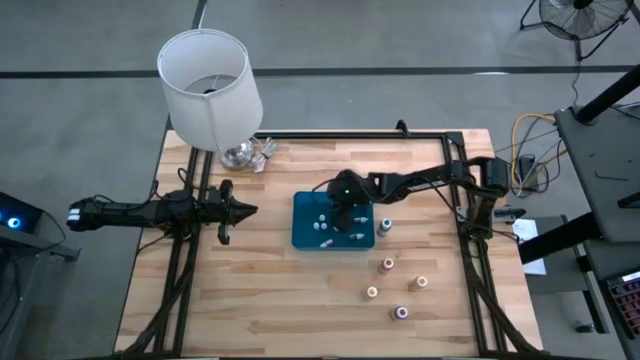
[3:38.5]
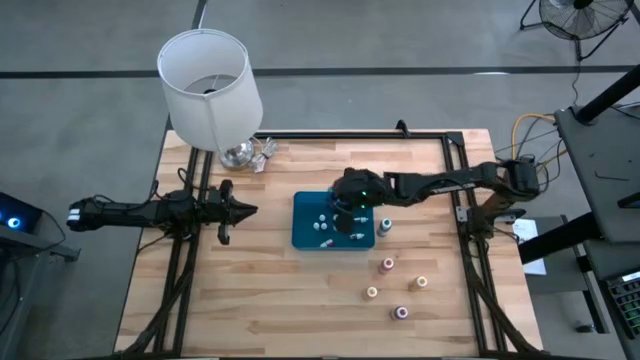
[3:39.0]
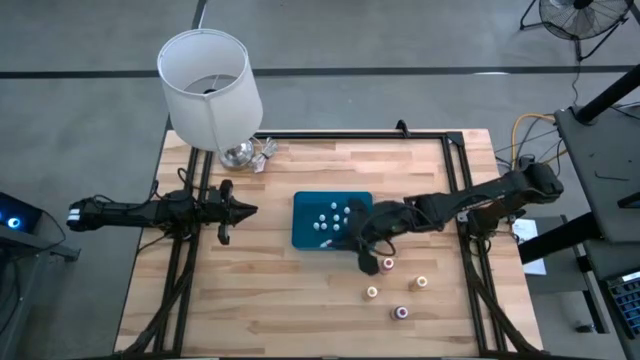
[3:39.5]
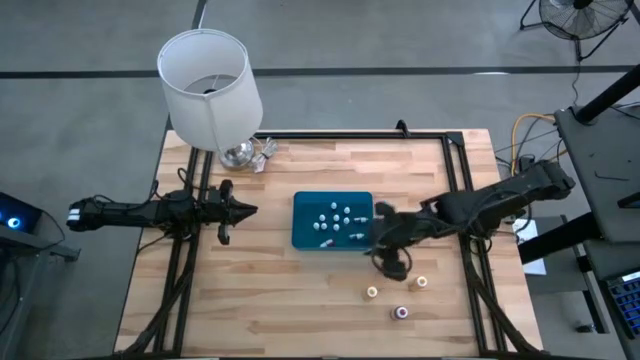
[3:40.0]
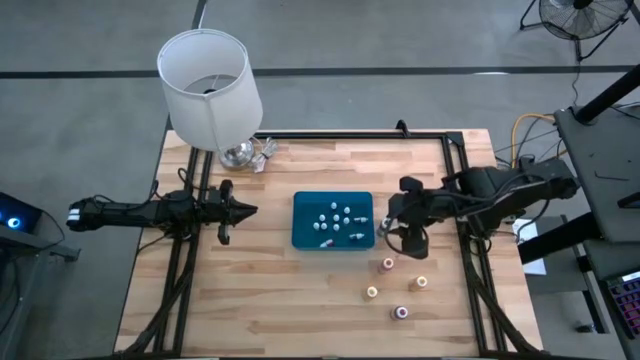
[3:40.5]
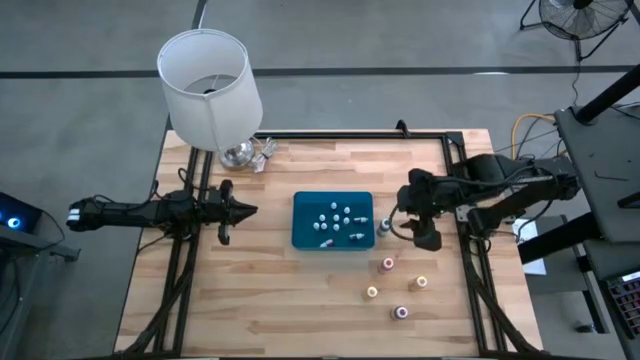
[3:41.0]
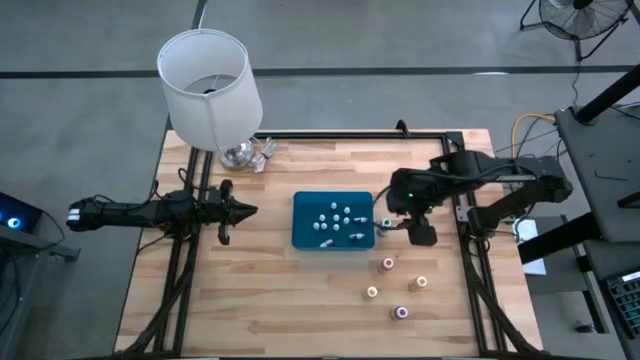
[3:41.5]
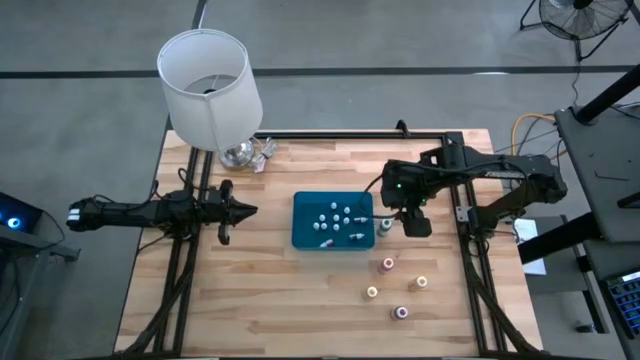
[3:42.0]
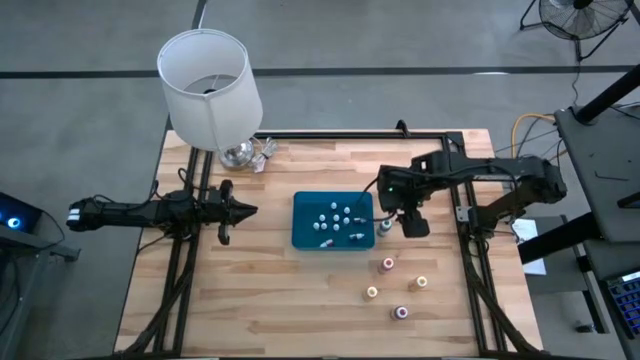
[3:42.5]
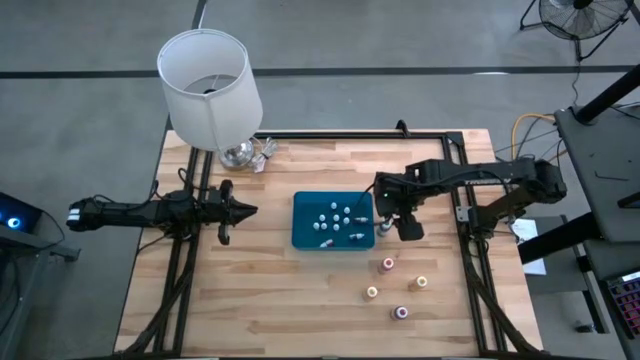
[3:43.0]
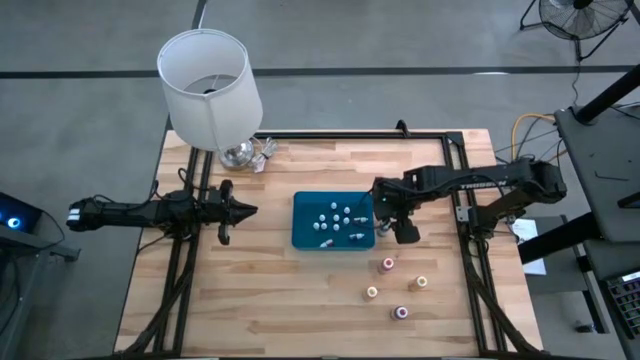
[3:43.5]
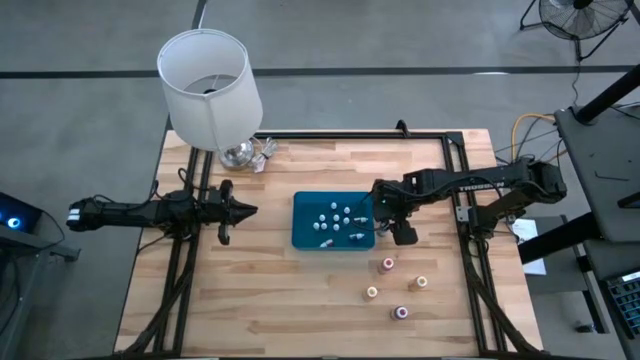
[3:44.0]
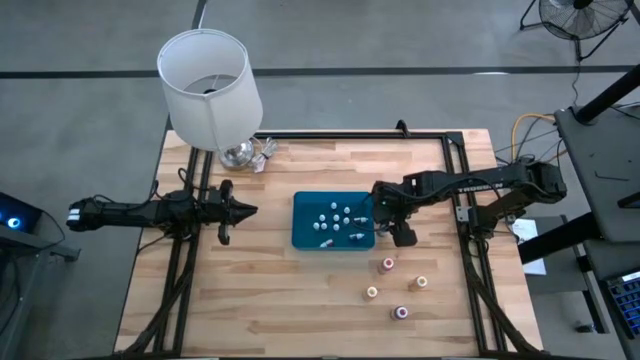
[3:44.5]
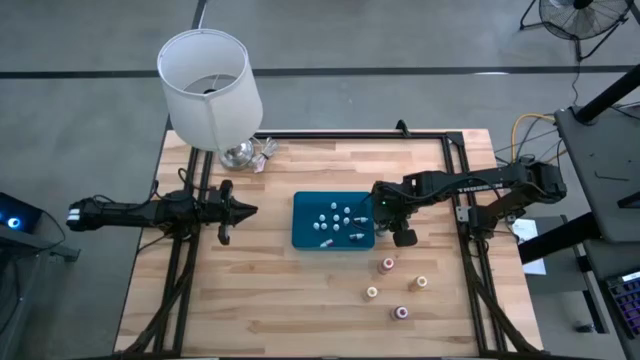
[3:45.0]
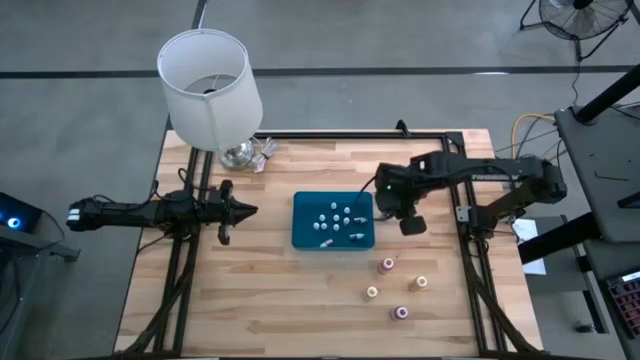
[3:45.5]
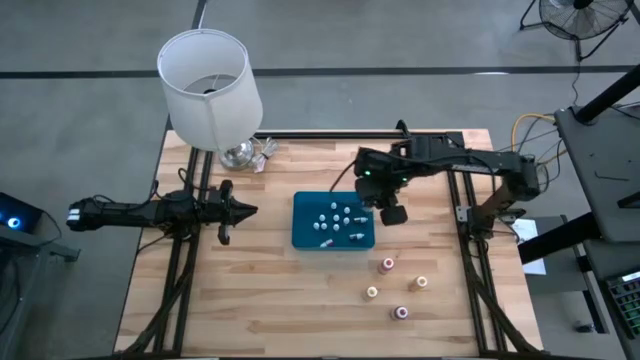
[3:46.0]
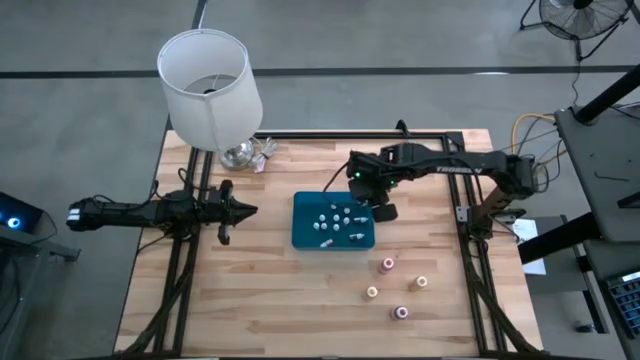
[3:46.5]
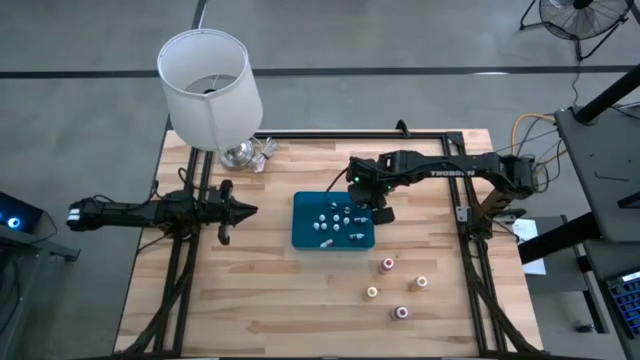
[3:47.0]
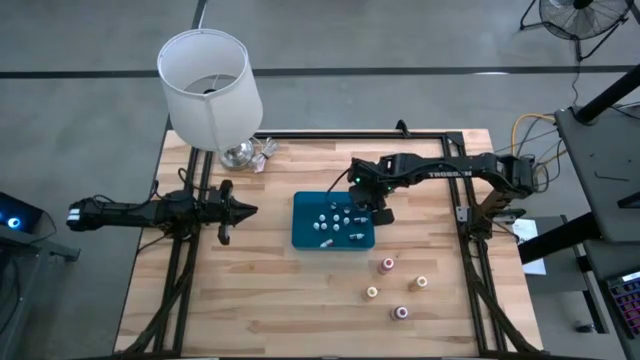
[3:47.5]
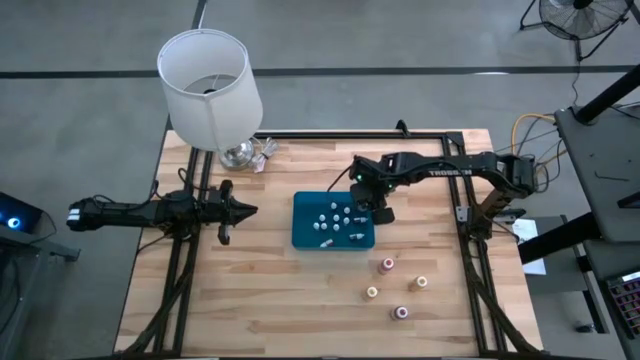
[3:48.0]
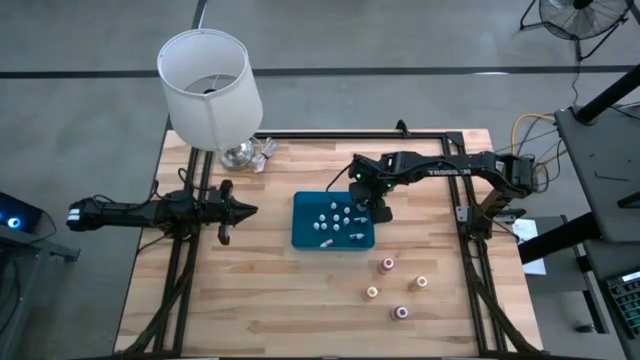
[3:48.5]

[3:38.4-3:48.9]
Task: Pick & Place food coloring
Put the large green food coloring bottle into the blue bin

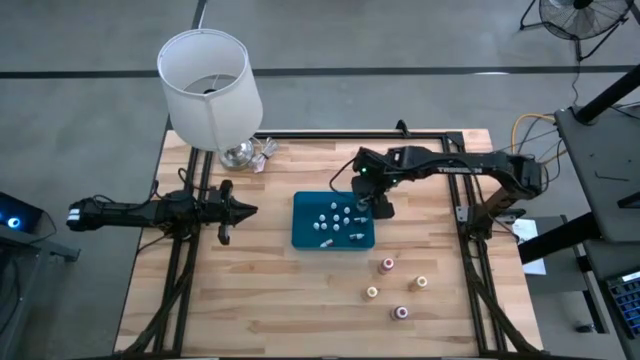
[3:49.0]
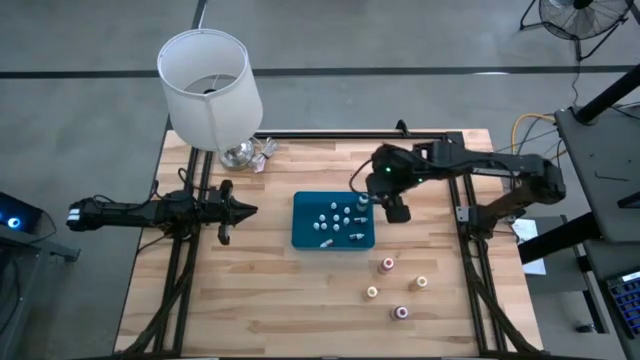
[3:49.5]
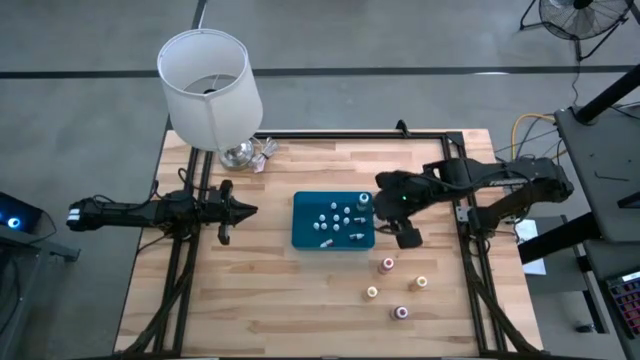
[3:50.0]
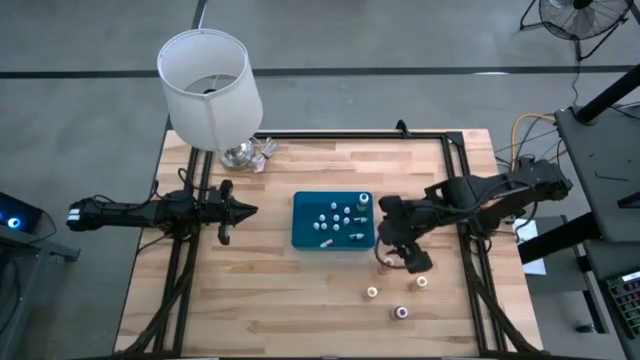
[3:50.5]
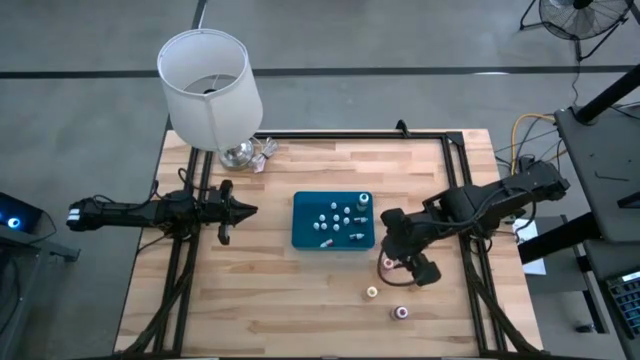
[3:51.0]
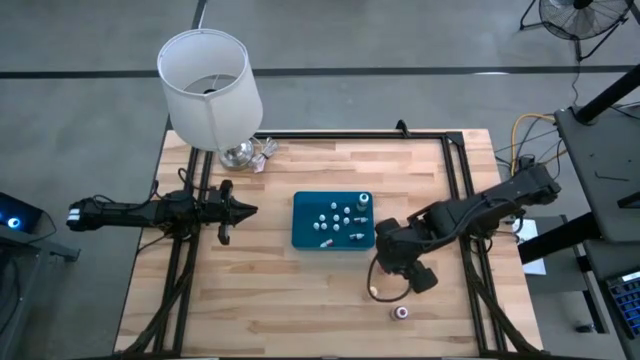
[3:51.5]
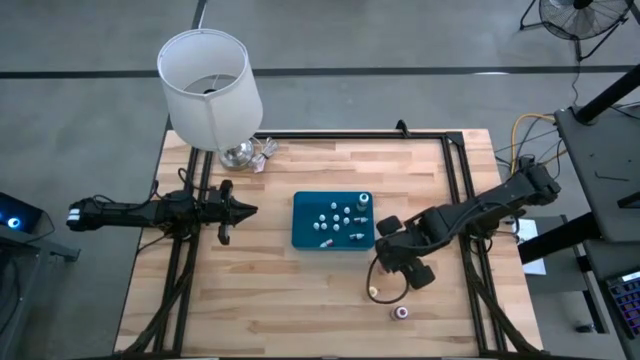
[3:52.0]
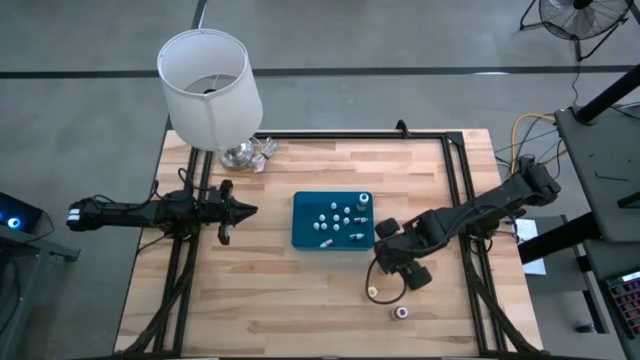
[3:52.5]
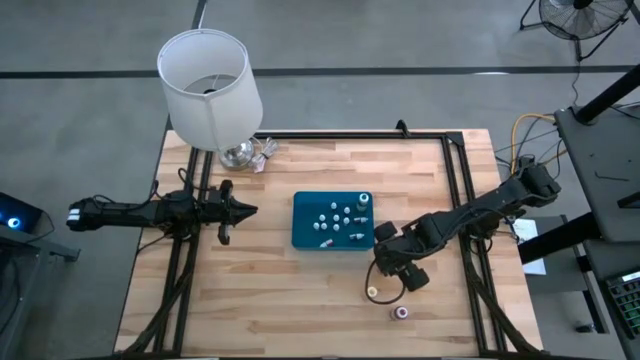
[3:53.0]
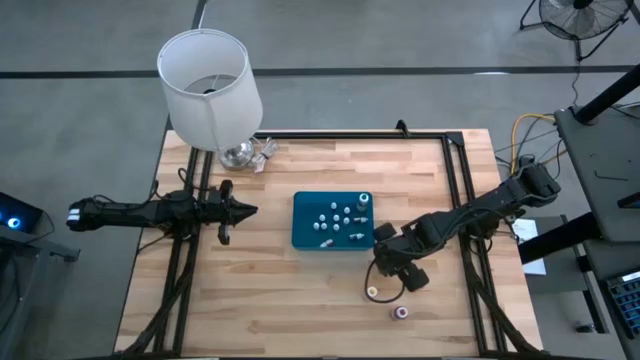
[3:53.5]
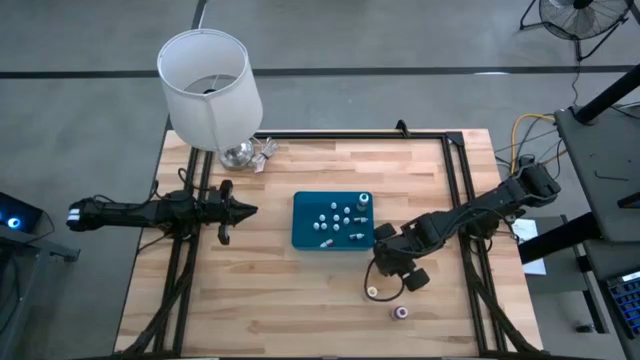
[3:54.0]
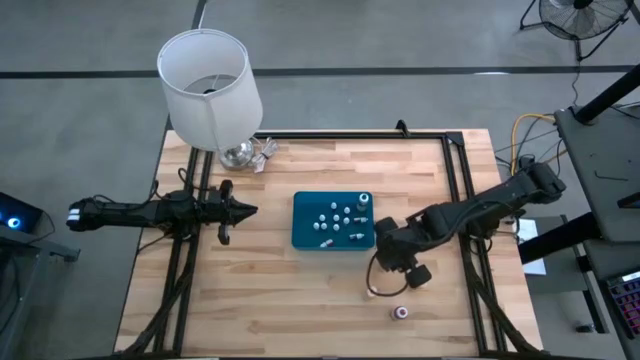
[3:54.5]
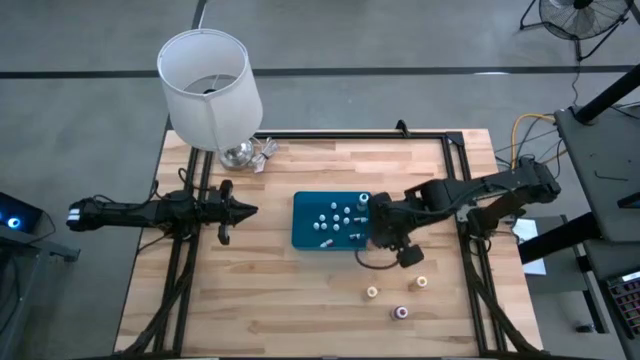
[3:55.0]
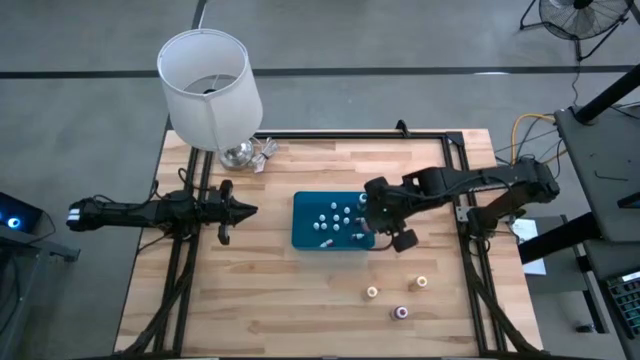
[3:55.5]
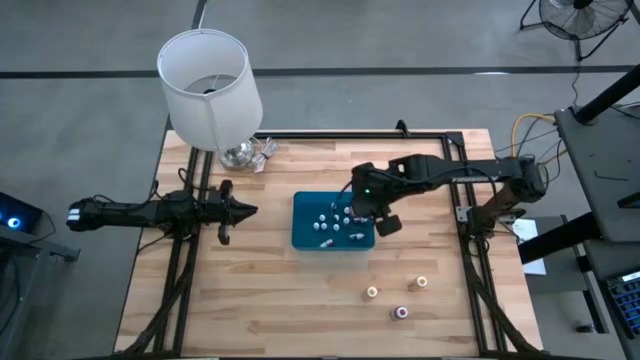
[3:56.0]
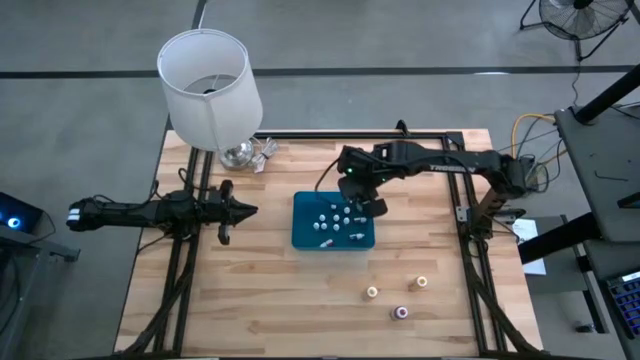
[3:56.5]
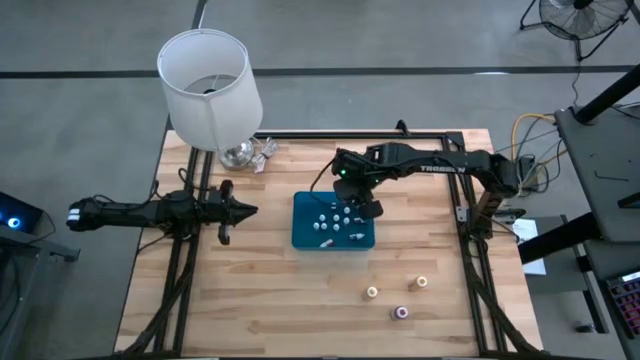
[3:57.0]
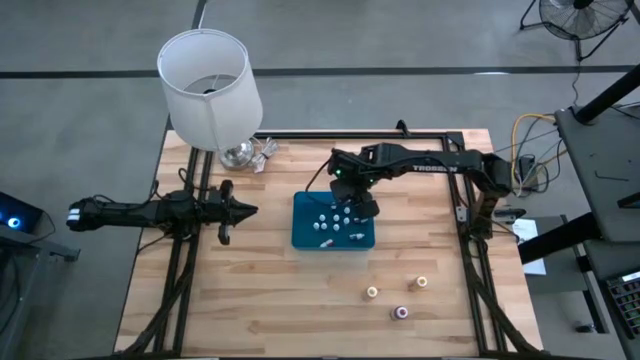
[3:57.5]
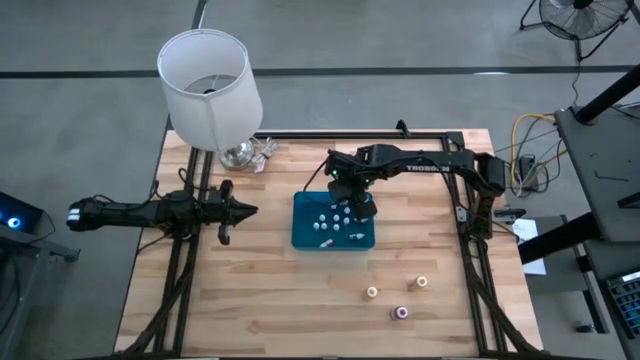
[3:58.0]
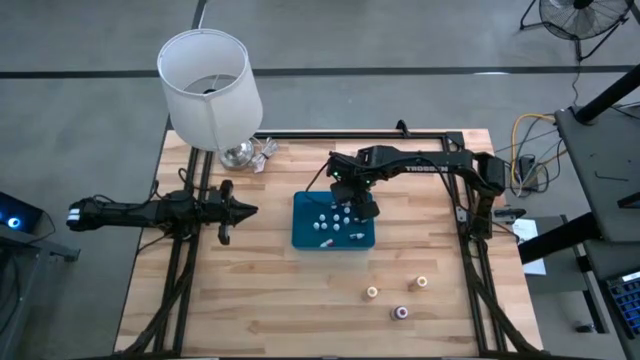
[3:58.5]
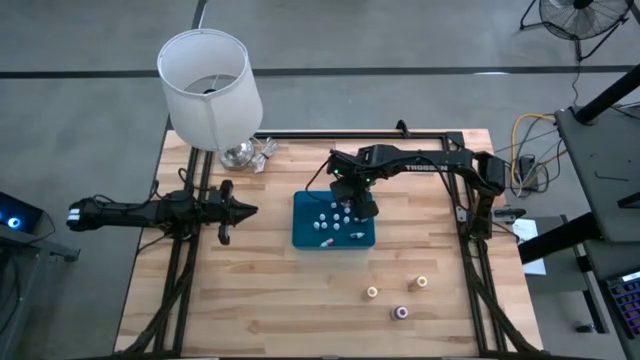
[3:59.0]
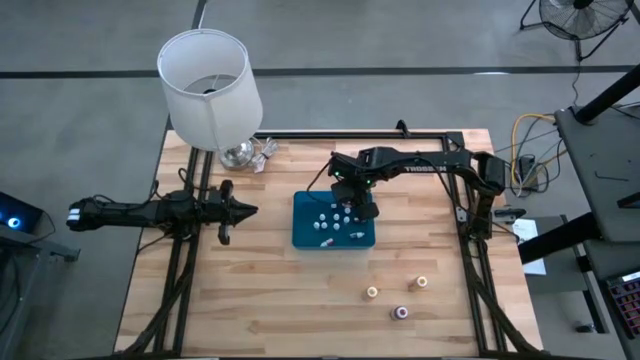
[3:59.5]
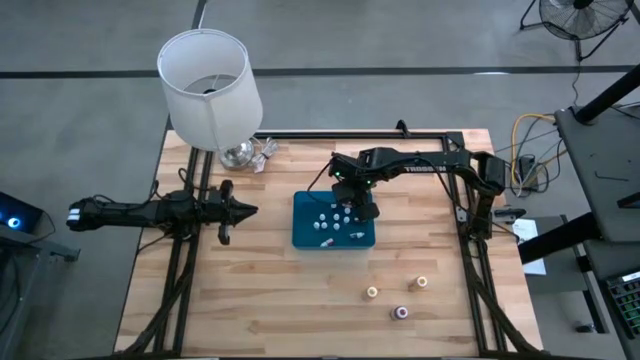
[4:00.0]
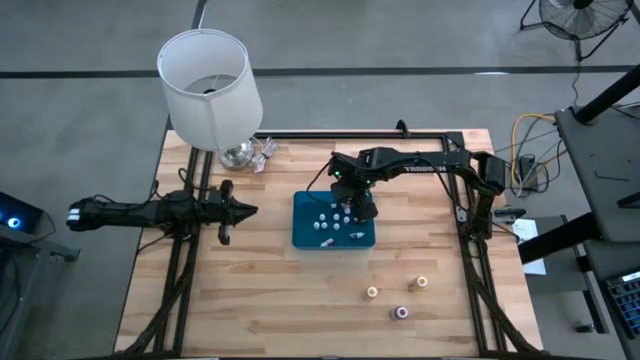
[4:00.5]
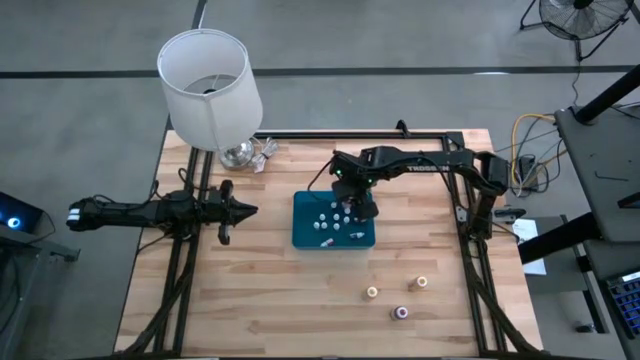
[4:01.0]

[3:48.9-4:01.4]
Put the large orange food coloring bottle into the blue bin
